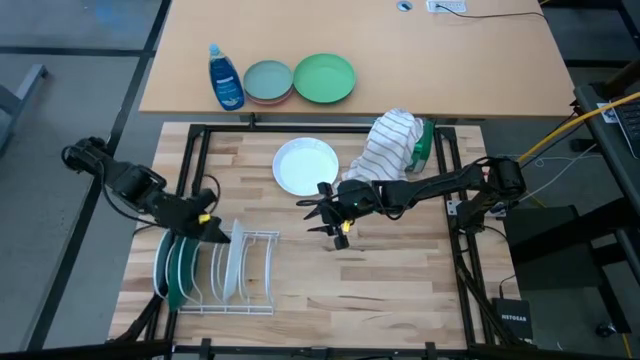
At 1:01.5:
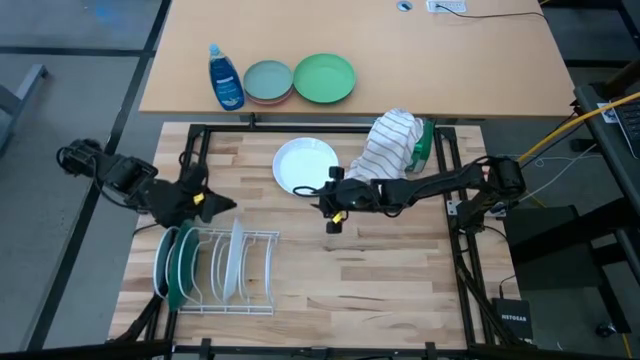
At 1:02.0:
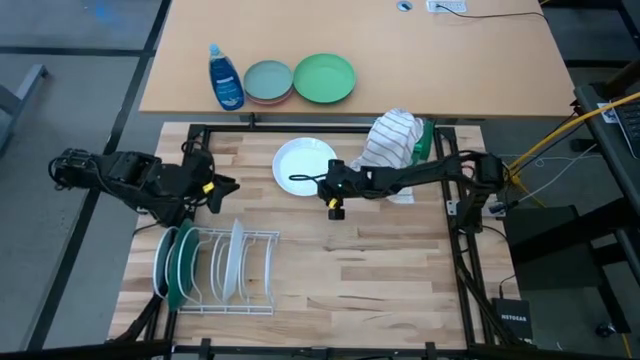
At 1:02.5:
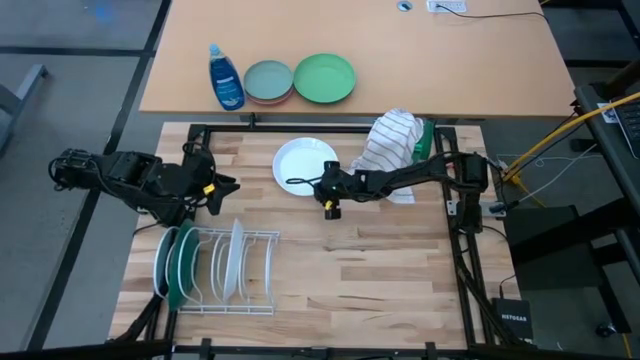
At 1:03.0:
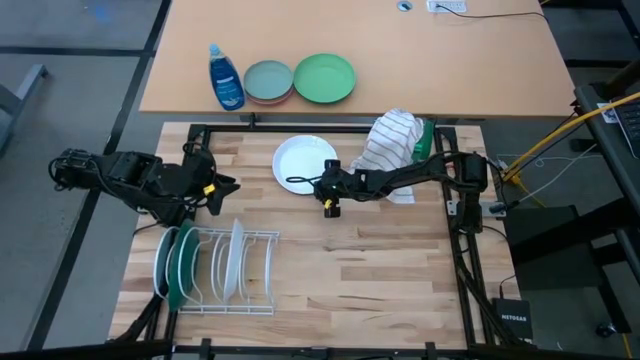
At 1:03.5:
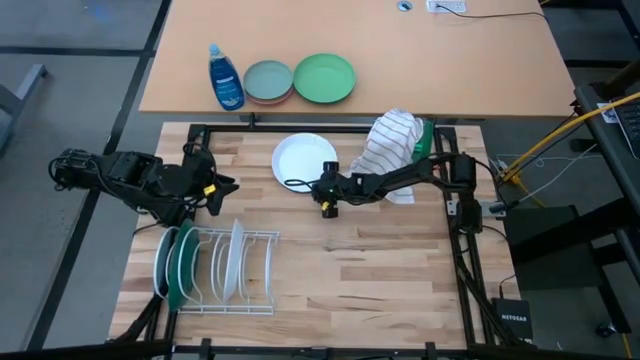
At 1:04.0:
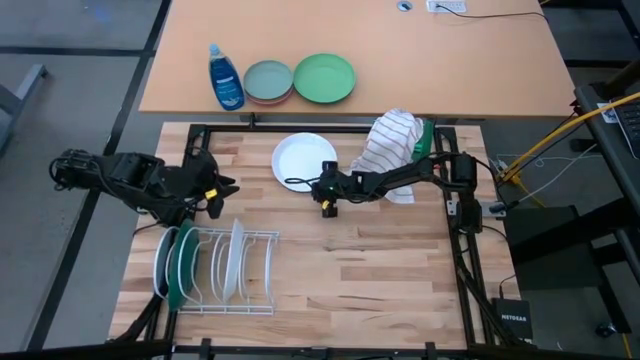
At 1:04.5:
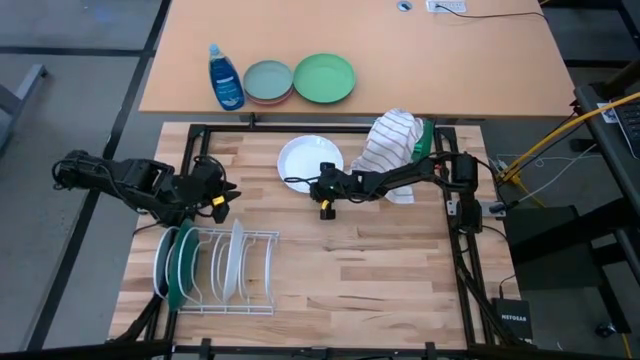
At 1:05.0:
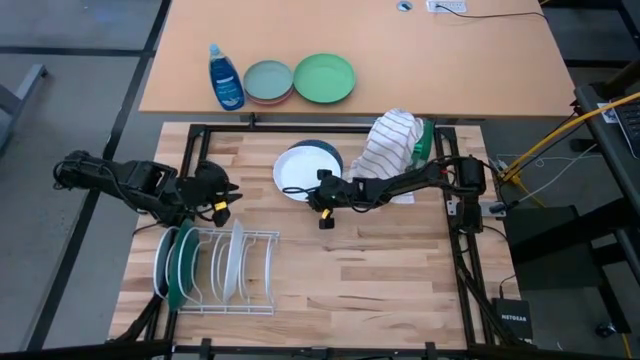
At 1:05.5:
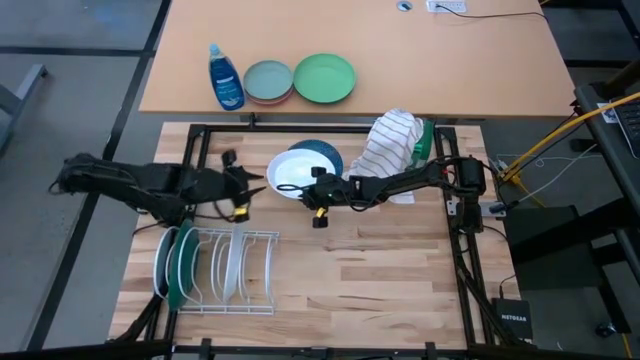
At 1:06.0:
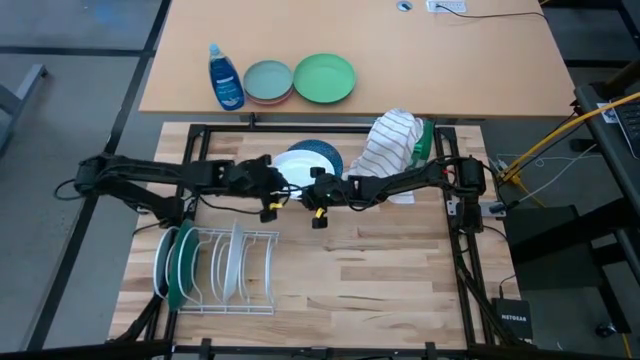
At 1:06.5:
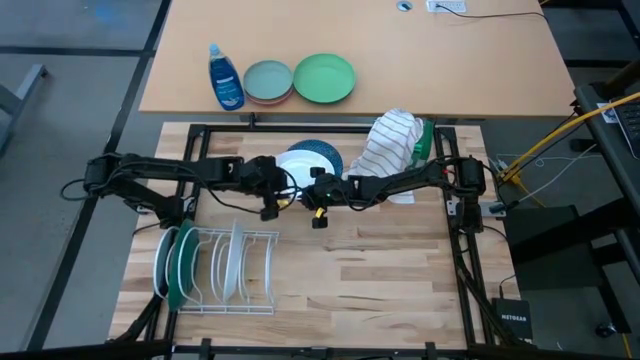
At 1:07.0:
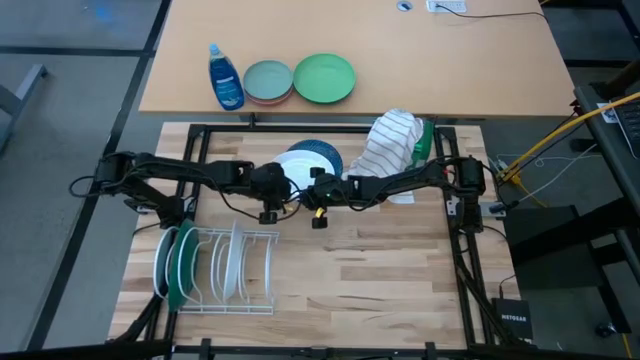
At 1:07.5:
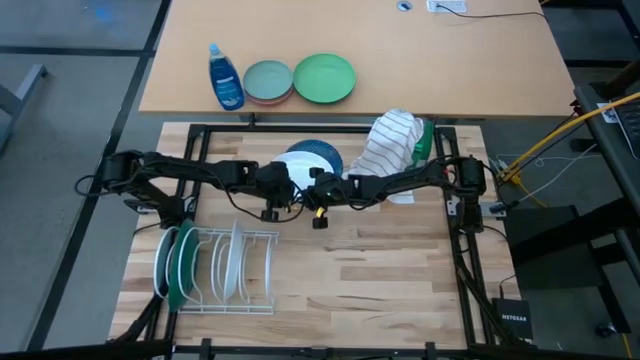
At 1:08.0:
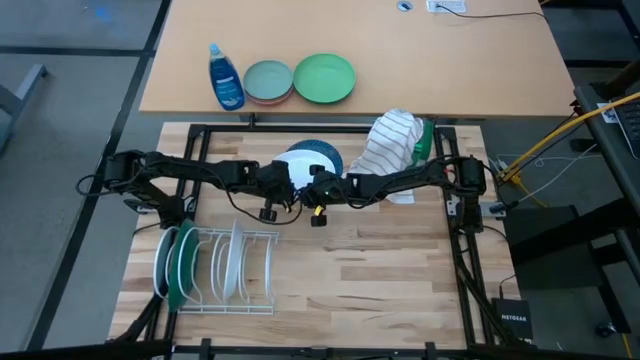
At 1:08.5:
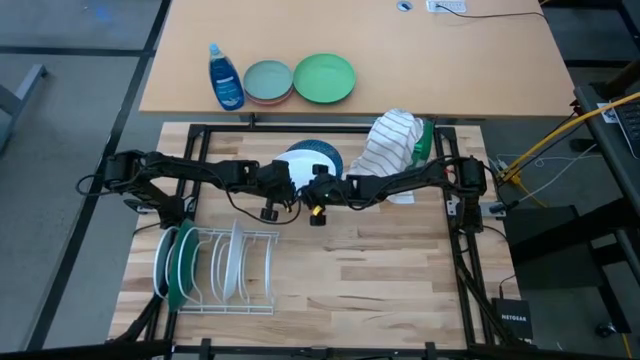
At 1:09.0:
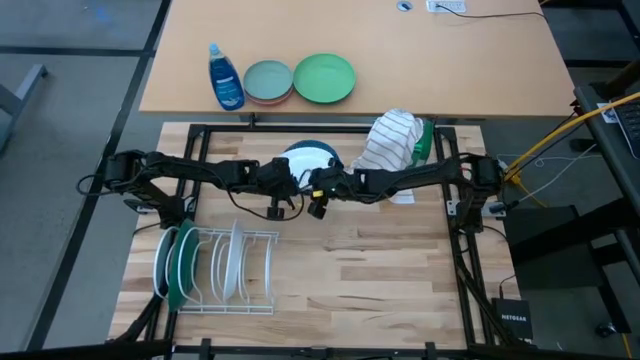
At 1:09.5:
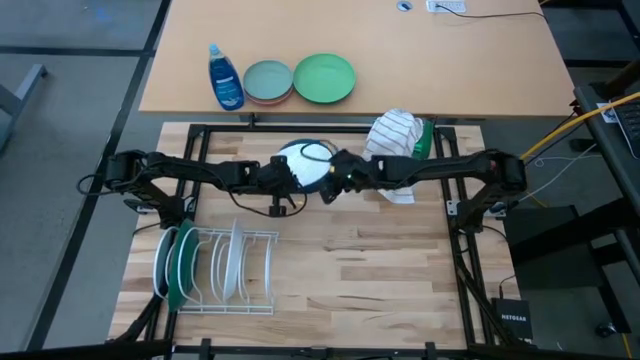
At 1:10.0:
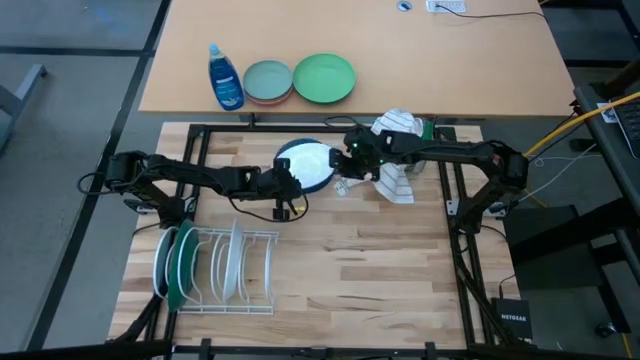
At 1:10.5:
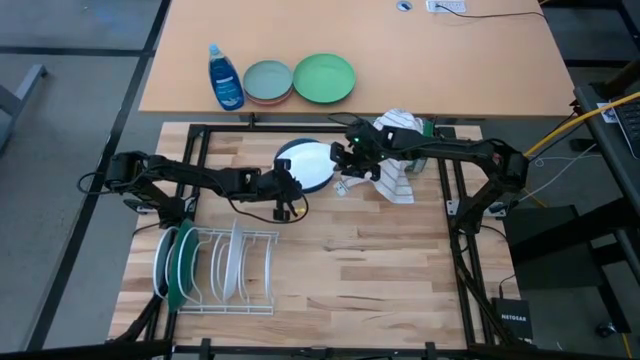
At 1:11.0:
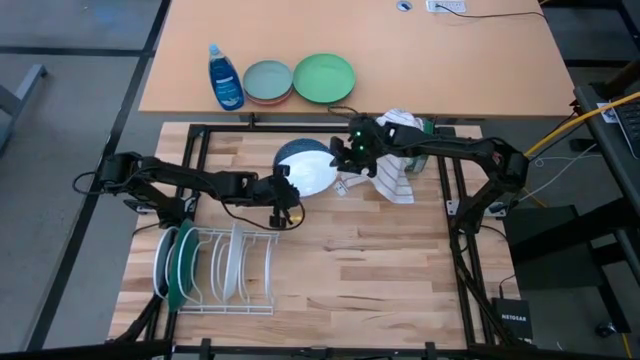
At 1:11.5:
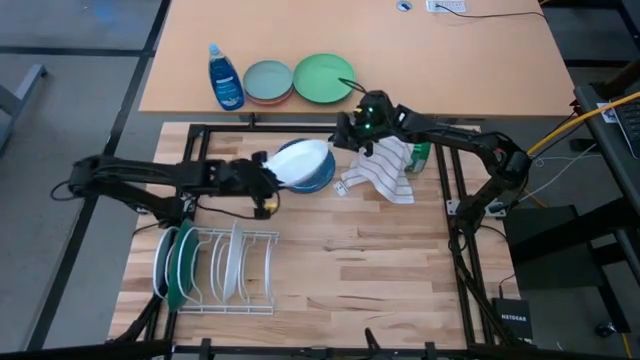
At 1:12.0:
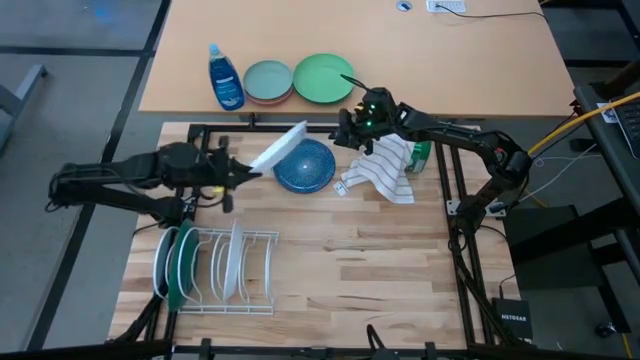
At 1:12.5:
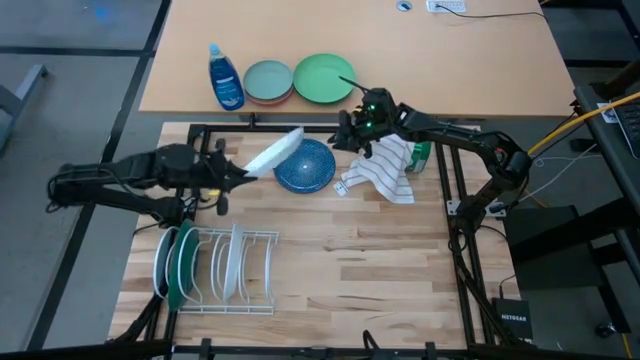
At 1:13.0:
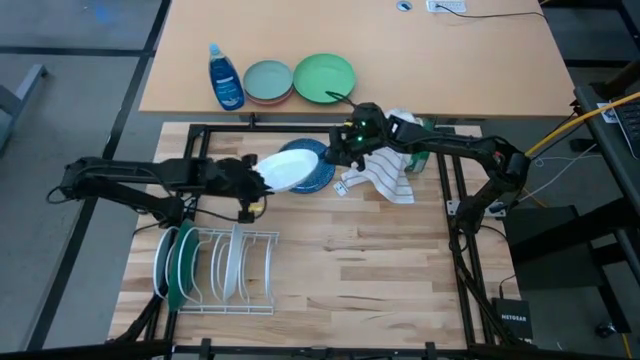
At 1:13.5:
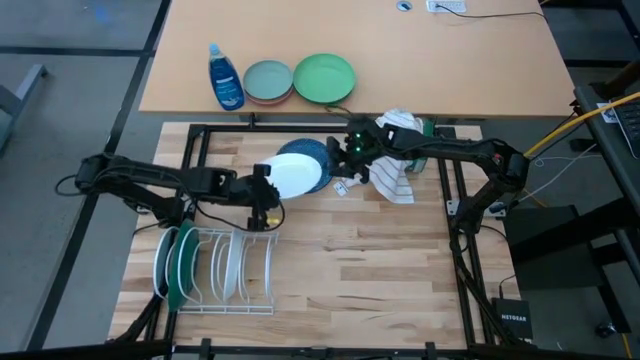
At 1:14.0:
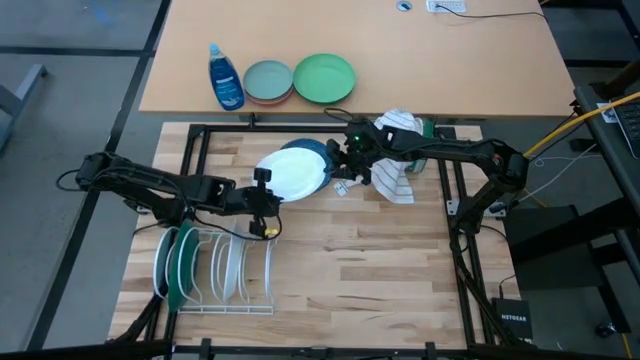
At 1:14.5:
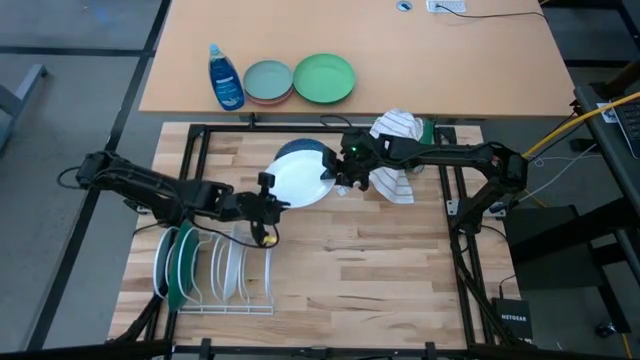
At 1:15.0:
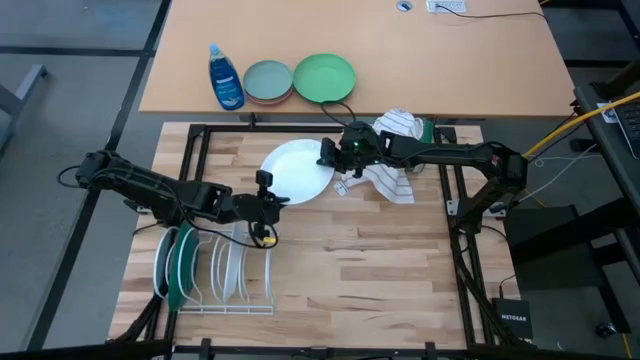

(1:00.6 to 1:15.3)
Task: Sort dishes
Put the white plate in the white dish rack

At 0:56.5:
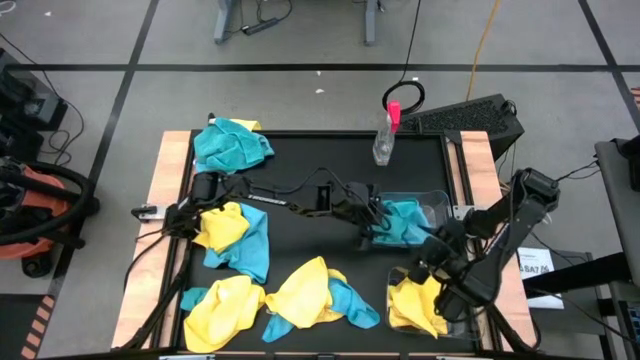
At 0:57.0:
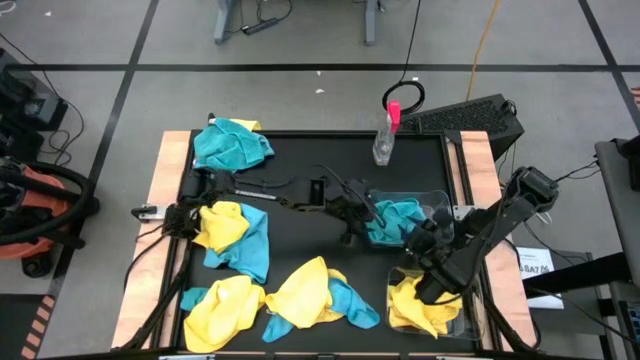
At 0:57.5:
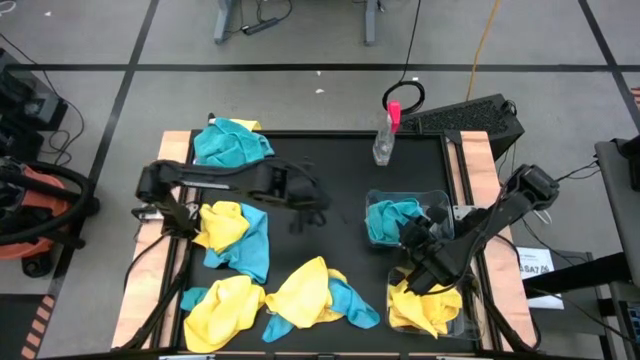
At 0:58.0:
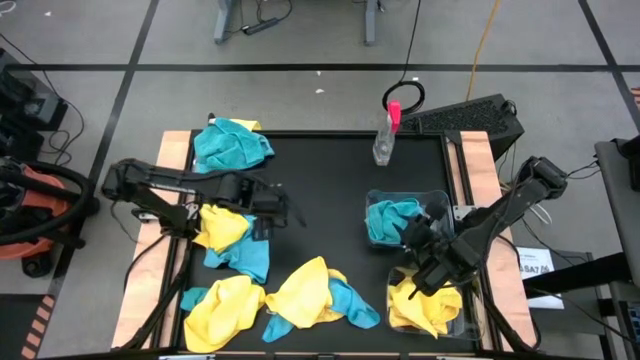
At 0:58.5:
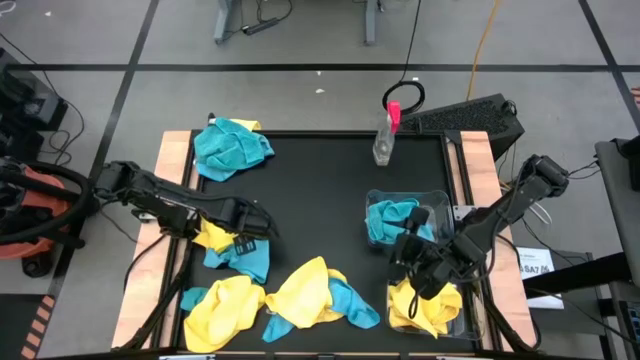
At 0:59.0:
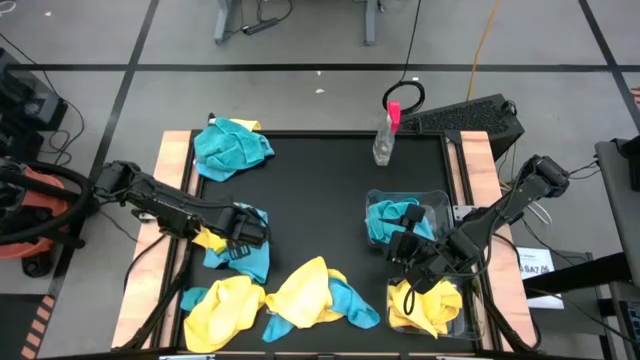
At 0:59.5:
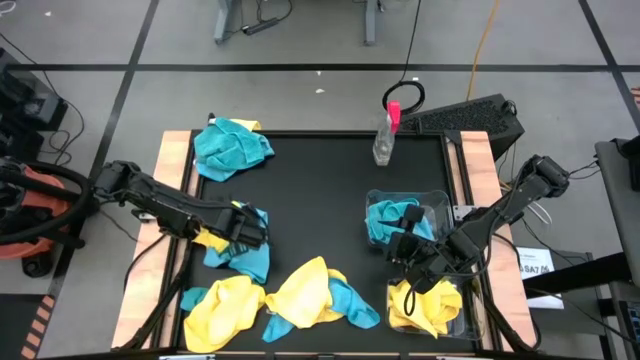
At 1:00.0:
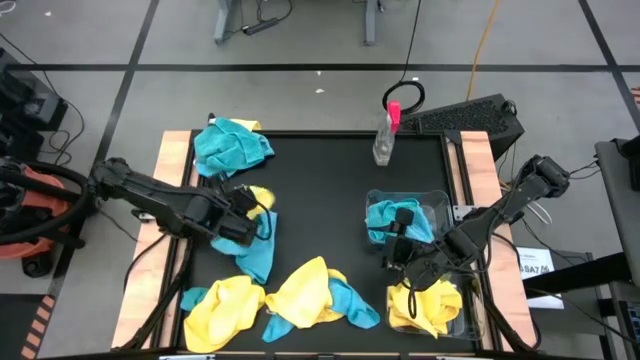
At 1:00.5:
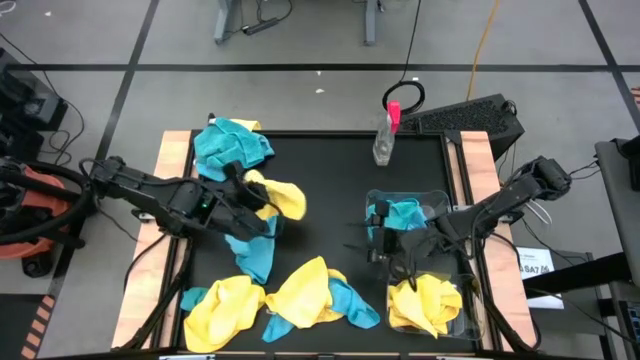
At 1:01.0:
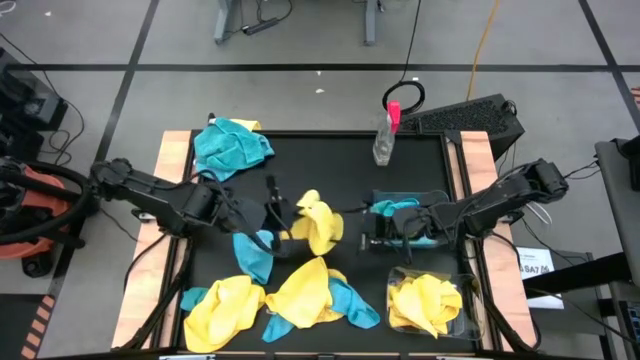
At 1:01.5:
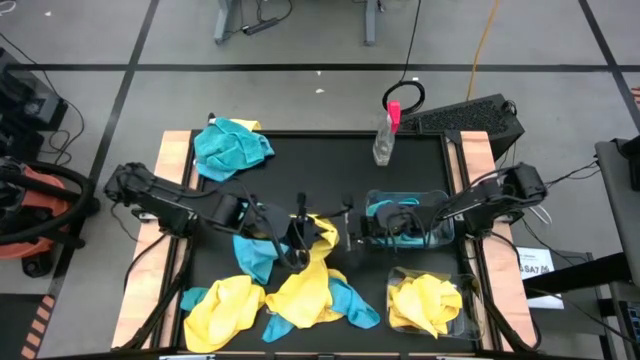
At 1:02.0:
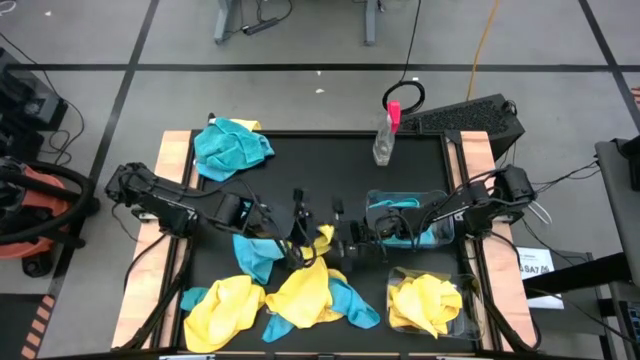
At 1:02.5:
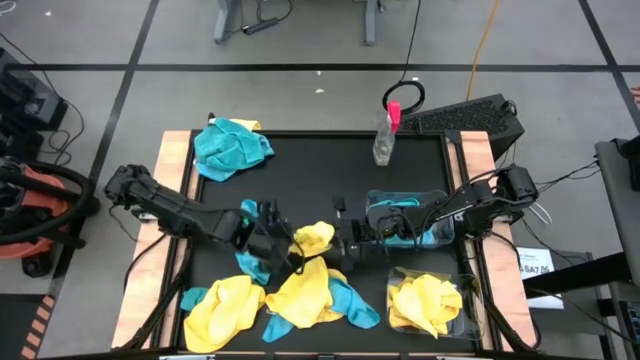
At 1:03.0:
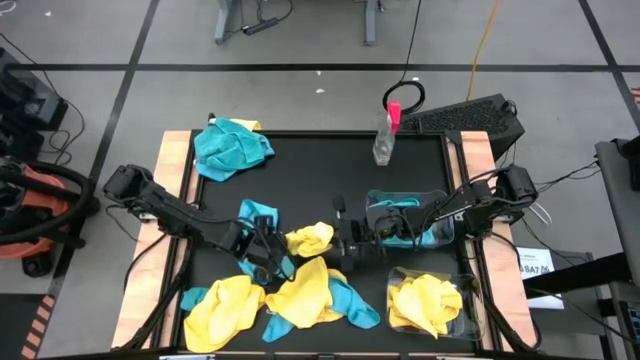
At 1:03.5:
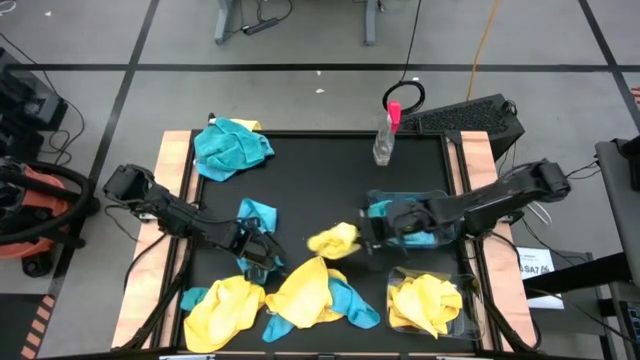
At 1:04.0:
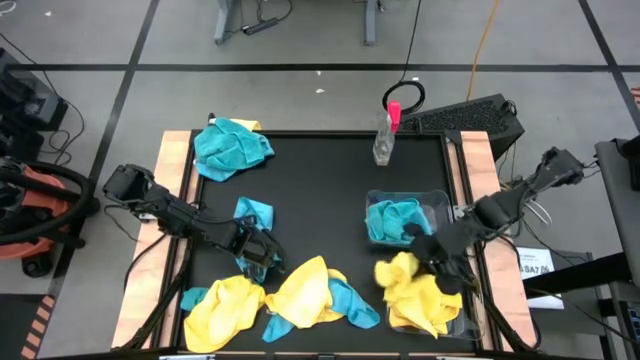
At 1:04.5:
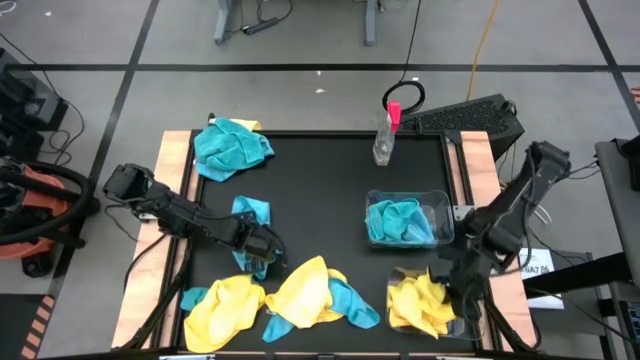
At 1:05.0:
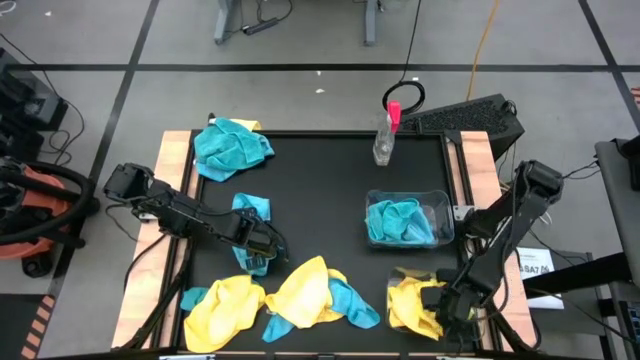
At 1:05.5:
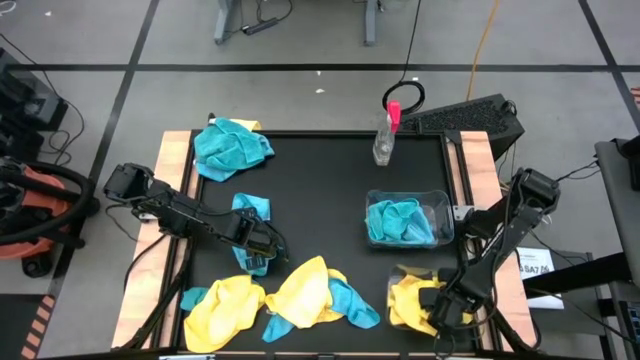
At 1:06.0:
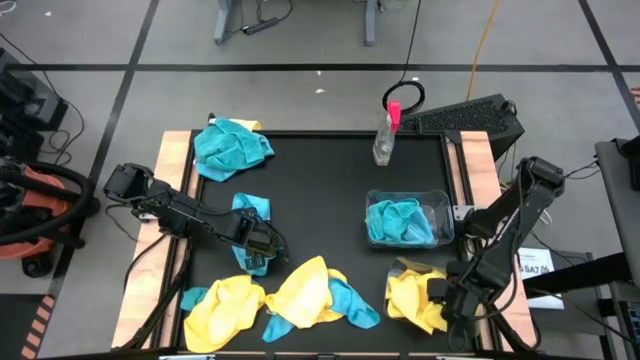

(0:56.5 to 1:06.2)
Task: Sort microfiber towel by color & place in baskets
Put the yellow towel into the bottom transparent bin
